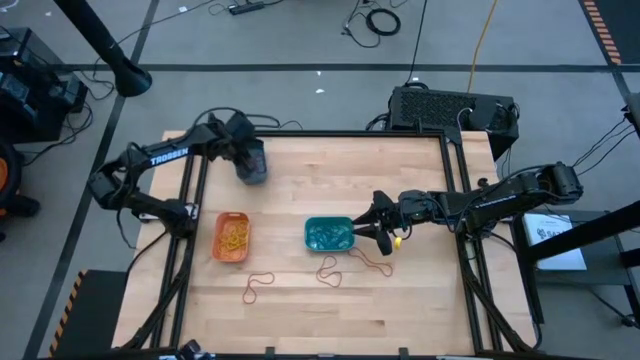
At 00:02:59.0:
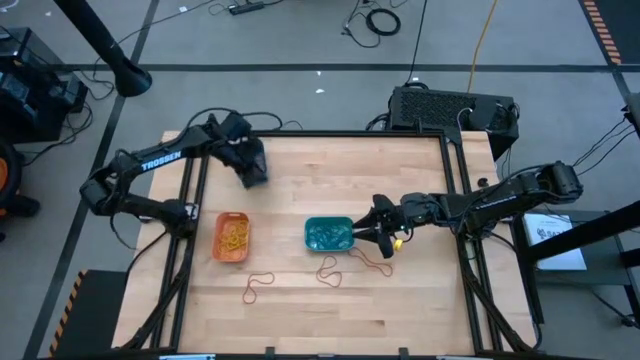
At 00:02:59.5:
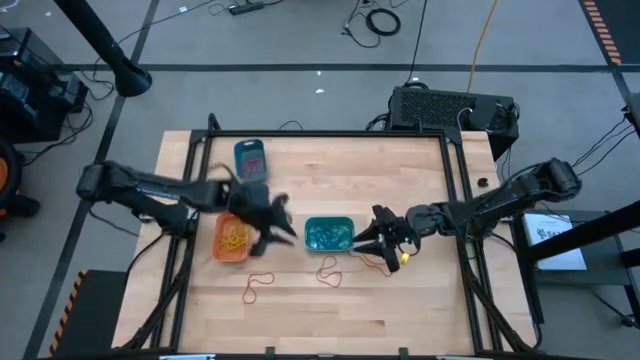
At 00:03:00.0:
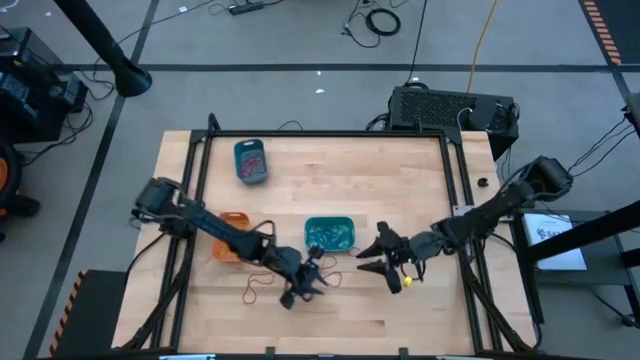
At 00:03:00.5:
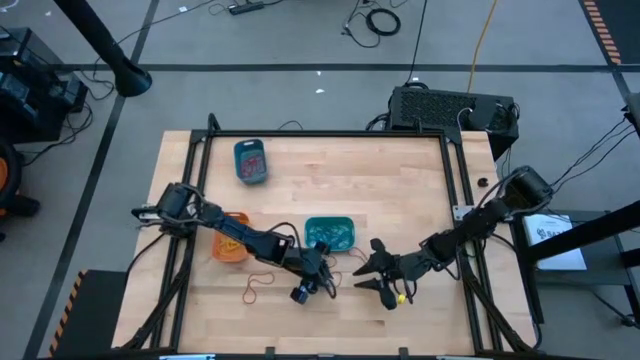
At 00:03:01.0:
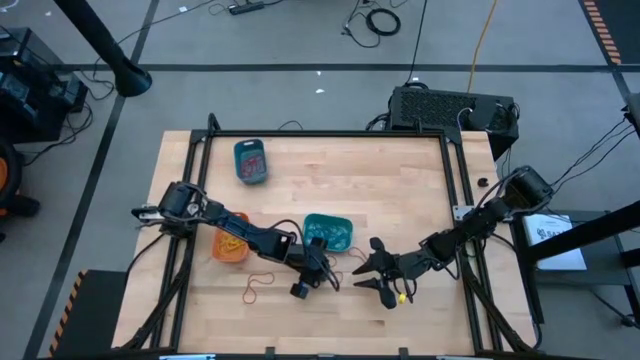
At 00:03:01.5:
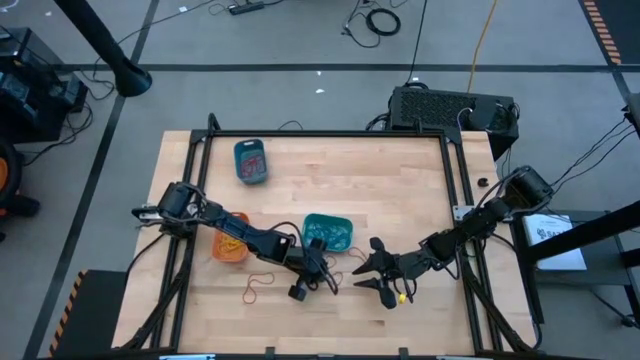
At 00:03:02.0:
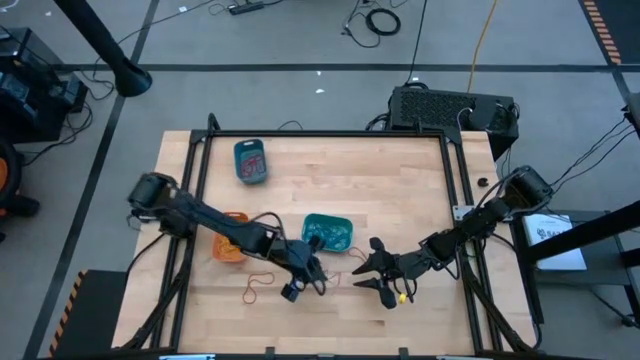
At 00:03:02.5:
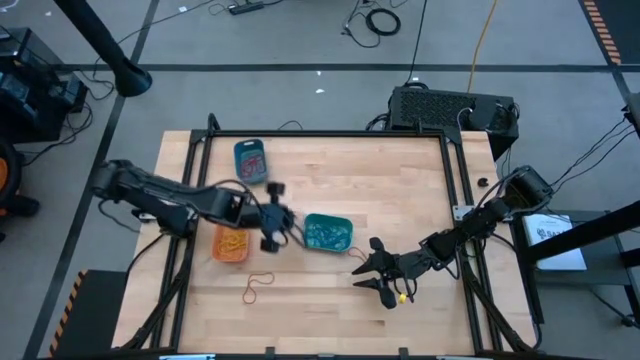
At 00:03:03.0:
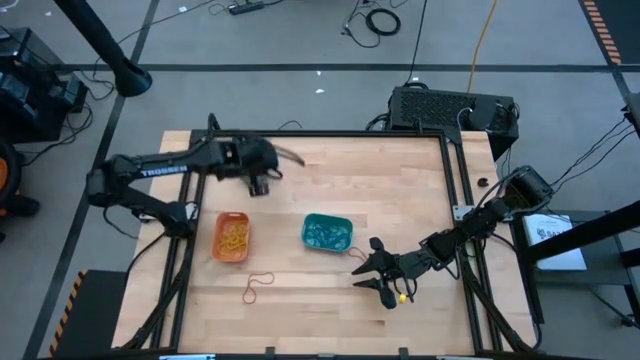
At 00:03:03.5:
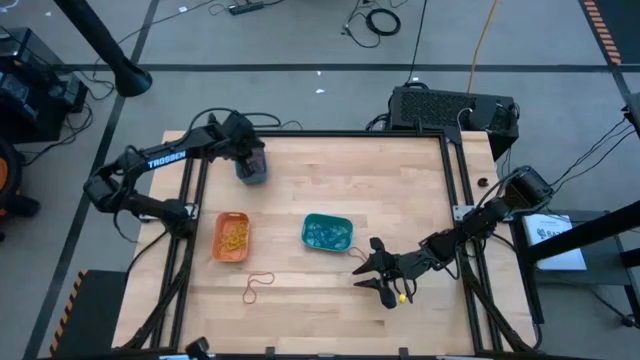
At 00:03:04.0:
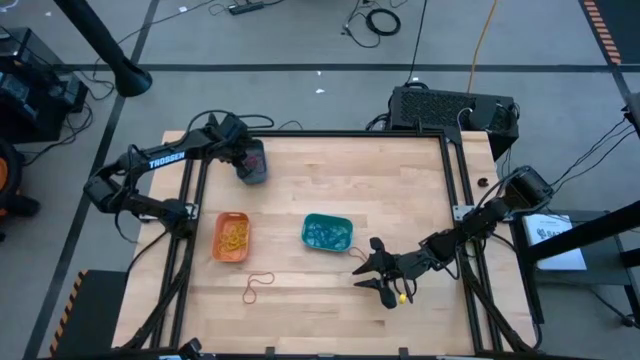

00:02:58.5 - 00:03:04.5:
Task: Sort rubber bands into baskets
Put the red rubber band into the blue bin

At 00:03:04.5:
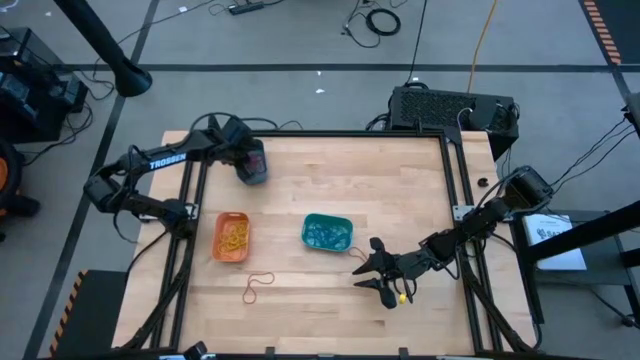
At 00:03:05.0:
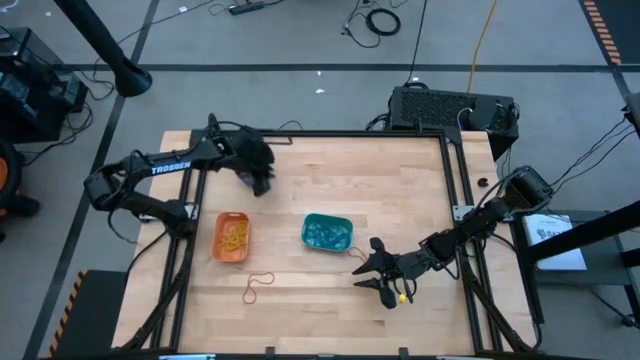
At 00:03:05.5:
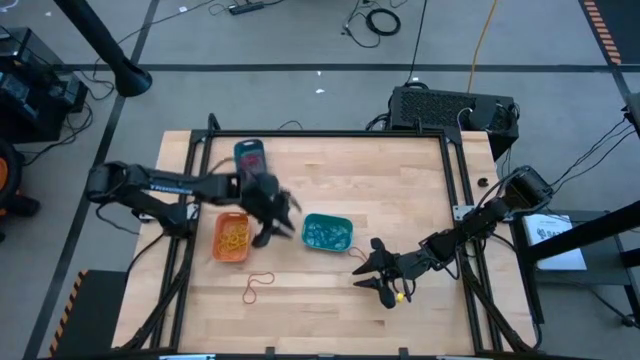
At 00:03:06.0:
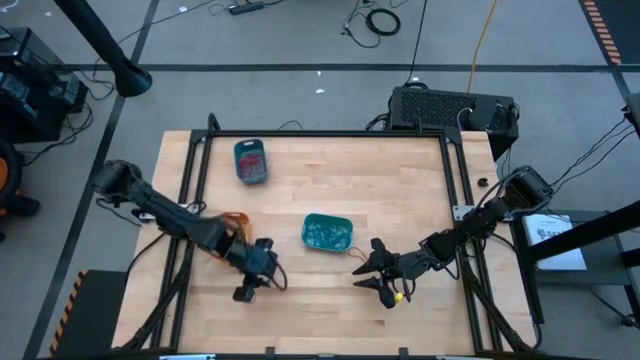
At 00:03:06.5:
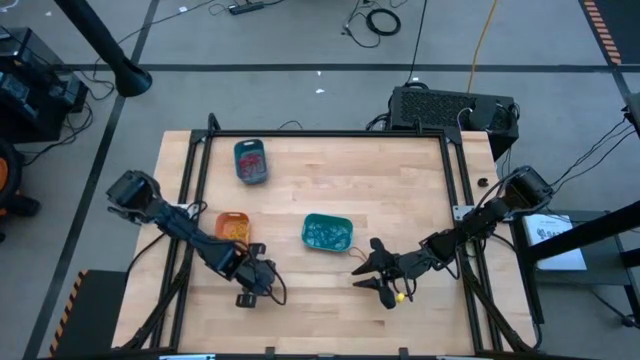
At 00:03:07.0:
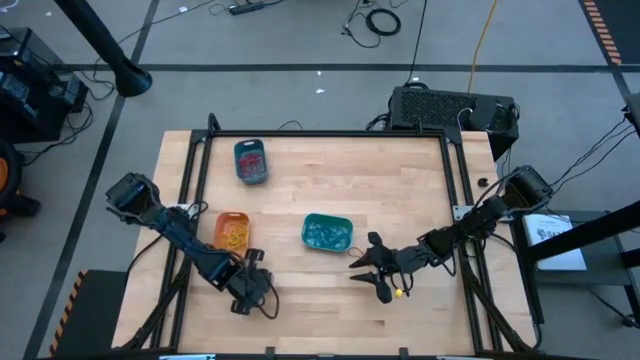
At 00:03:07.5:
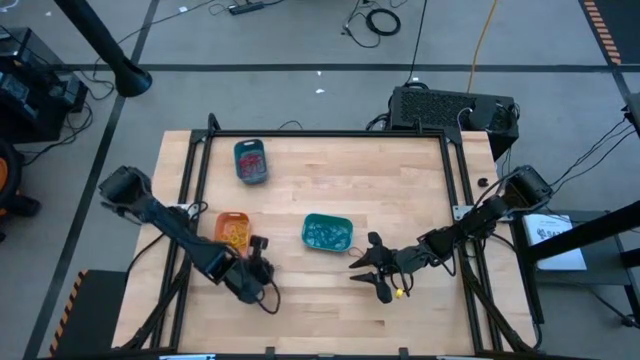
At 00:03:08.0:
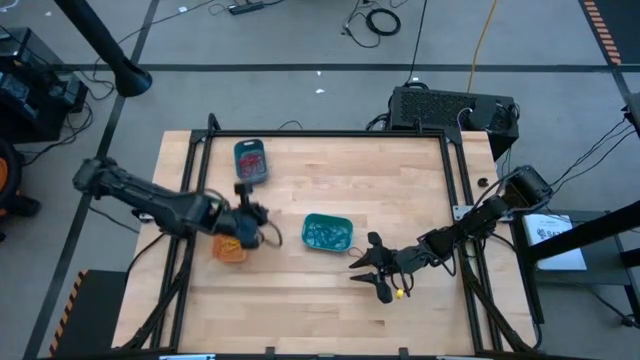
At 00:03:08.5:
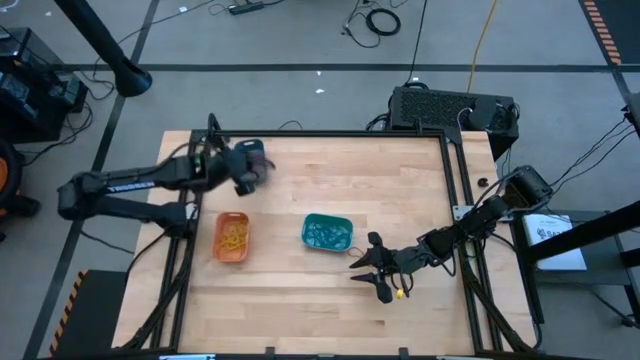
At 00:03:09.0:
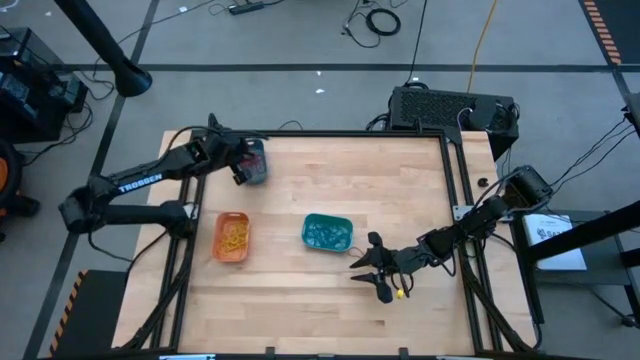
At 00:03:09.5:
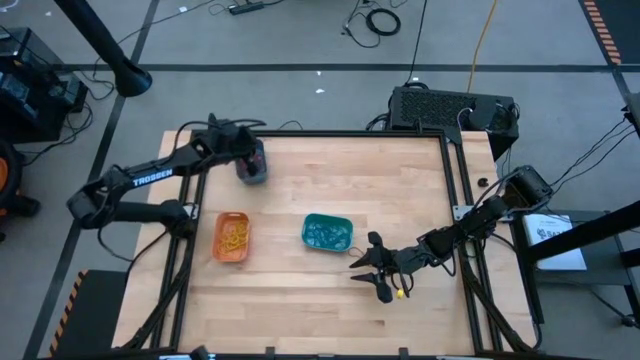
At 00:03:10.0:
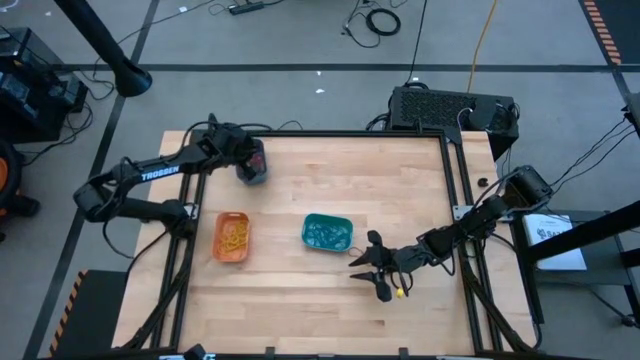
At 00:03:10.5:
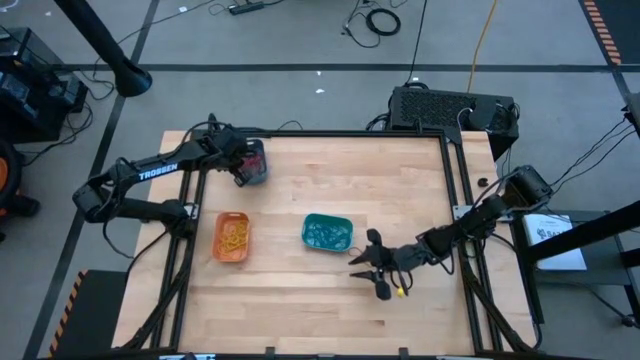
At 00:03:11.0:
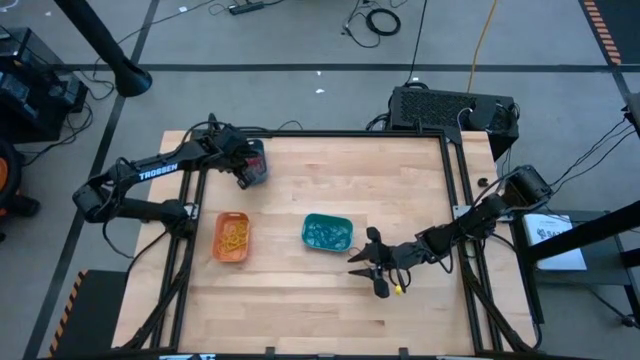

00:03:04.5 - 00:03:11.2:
Put the red rubber band into the blue bin

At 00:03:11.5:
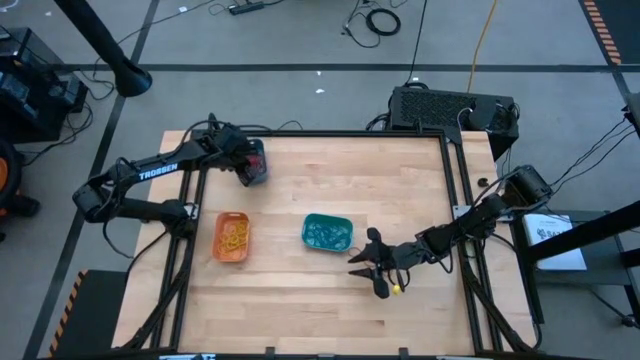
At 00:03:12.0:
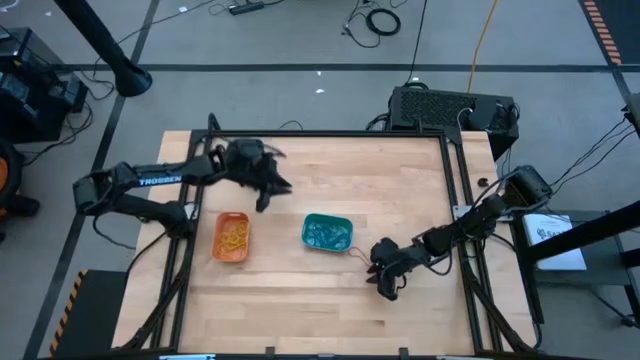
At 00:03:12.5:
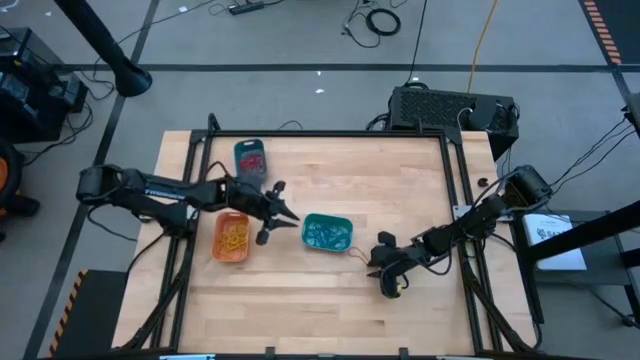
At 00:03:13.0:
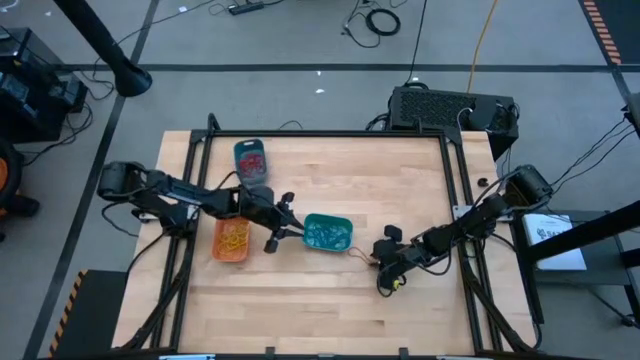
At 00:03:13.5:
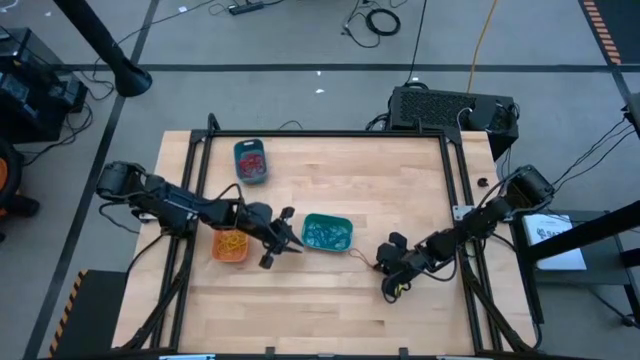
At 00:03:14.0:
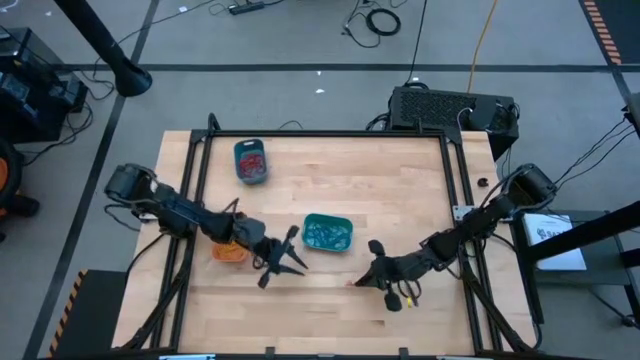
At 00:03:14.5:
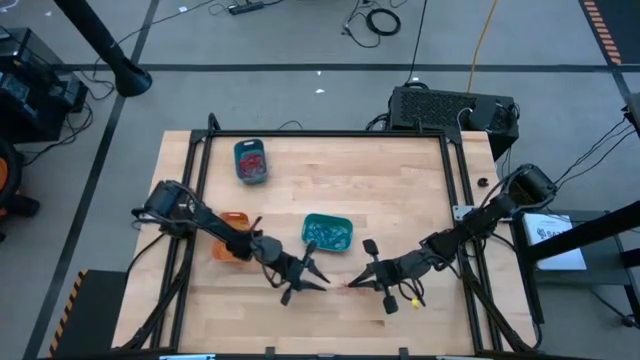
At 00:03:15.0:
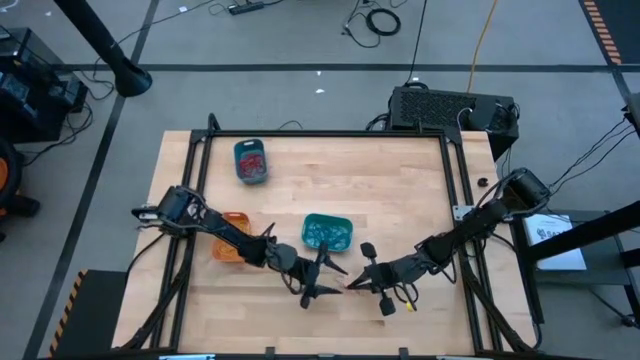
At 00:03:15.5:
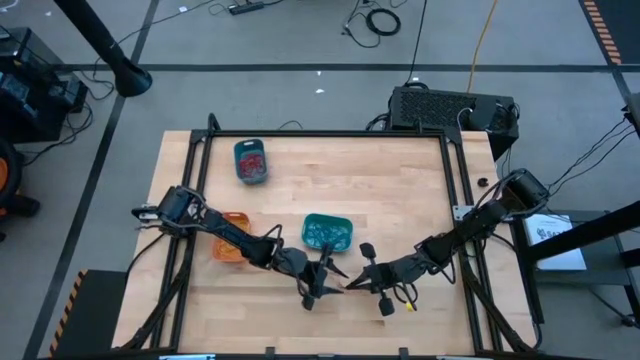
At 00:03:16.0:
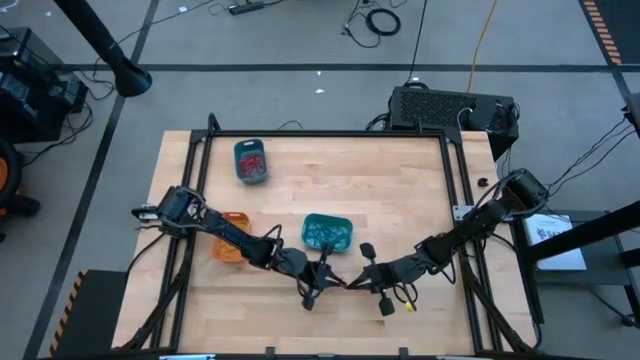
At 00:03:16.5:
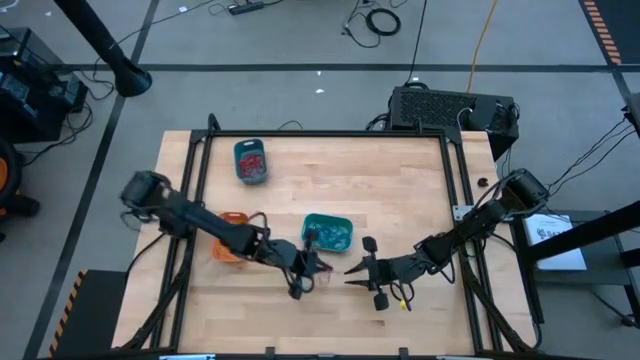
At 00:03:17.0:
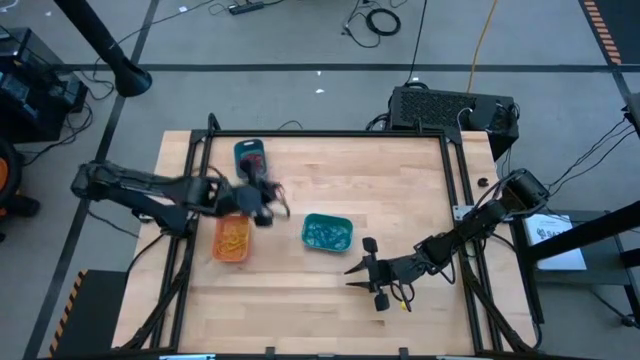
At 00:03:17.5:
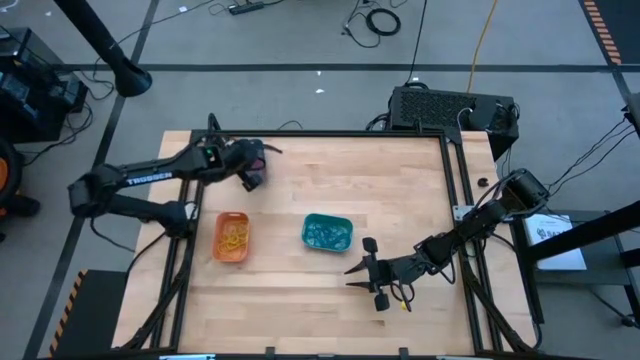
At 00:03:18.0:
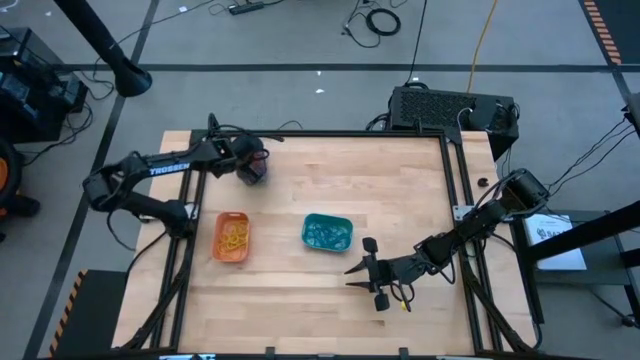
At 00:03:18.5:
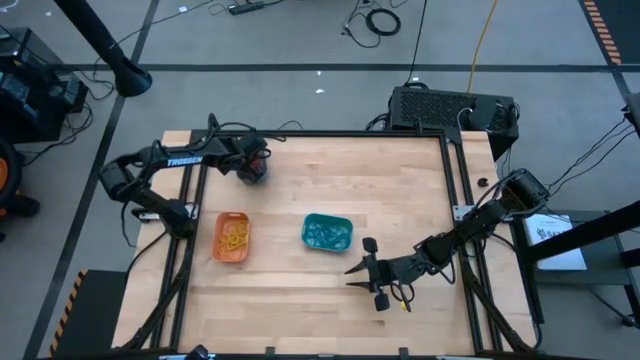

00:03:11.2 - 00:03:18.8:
Put the red rubber band into the blue bin
